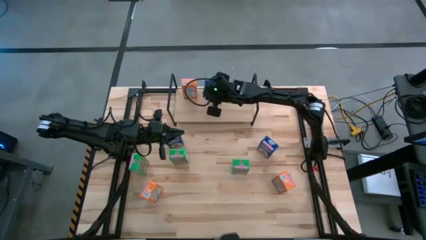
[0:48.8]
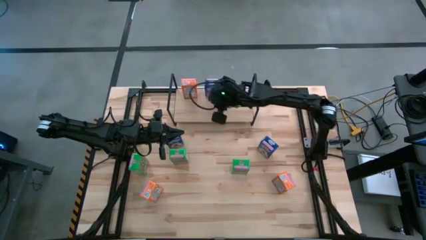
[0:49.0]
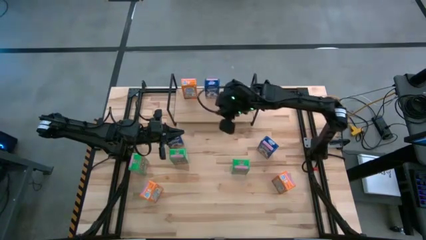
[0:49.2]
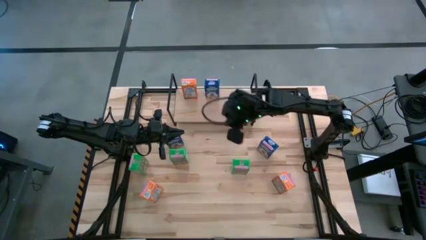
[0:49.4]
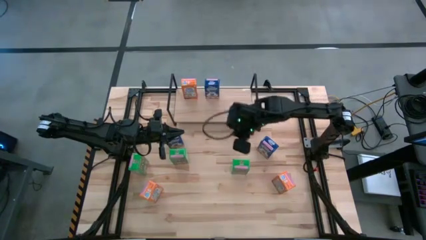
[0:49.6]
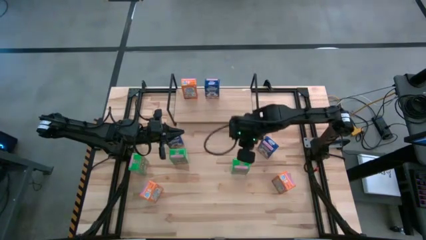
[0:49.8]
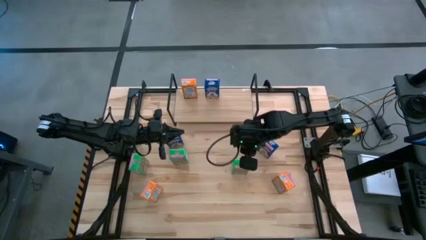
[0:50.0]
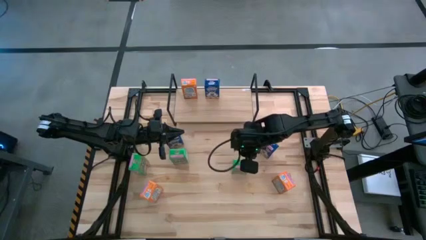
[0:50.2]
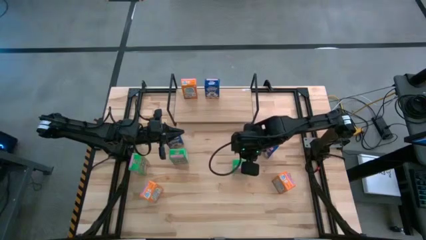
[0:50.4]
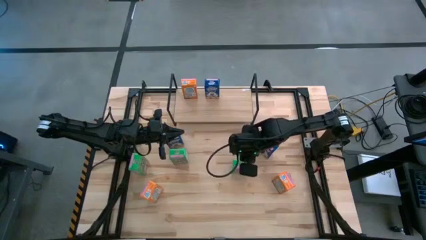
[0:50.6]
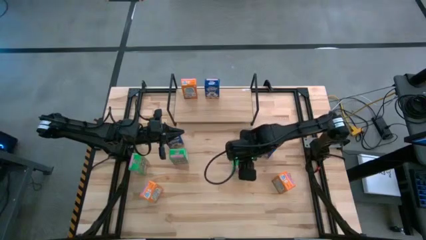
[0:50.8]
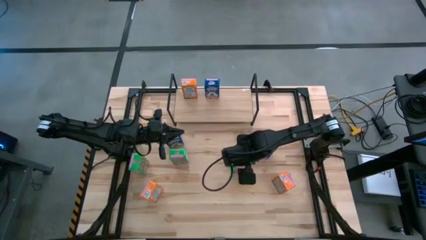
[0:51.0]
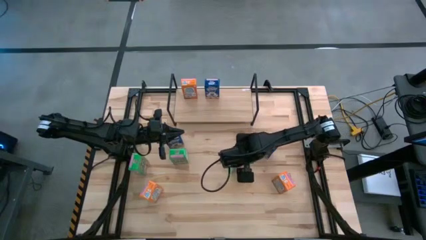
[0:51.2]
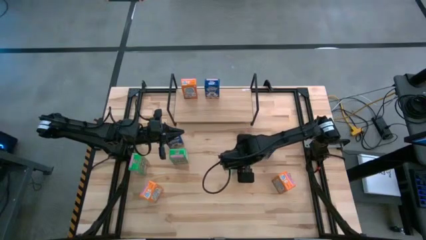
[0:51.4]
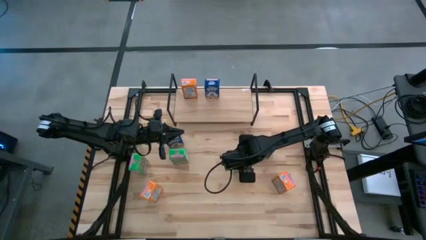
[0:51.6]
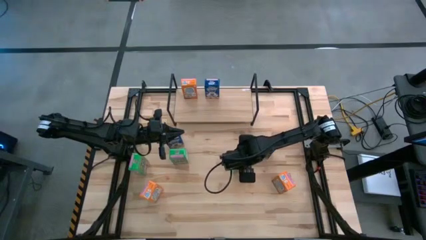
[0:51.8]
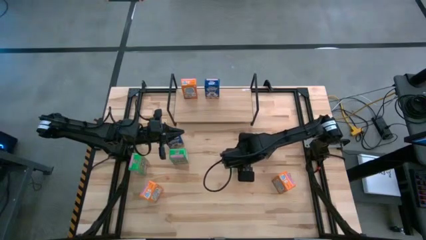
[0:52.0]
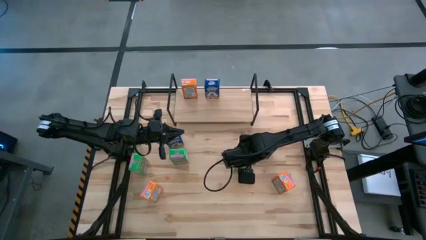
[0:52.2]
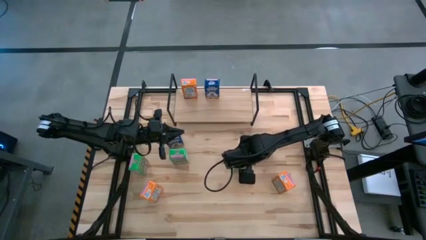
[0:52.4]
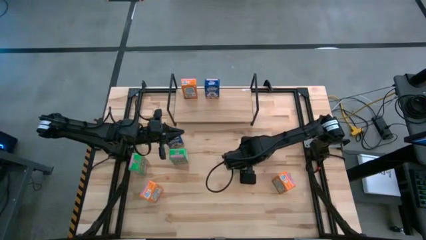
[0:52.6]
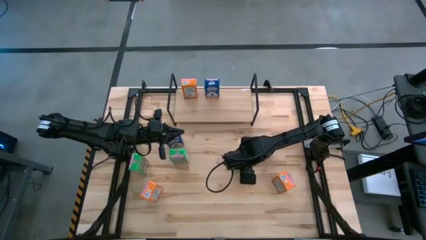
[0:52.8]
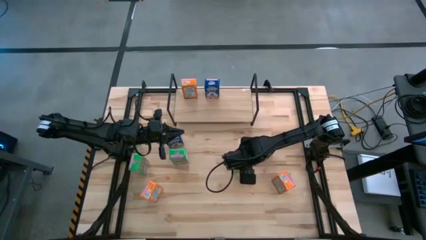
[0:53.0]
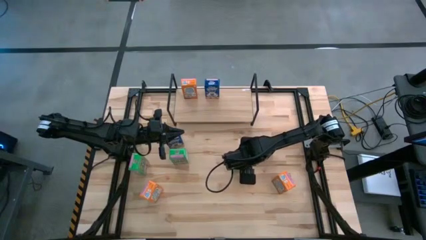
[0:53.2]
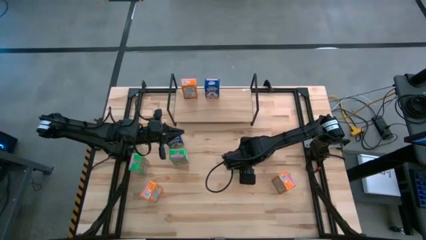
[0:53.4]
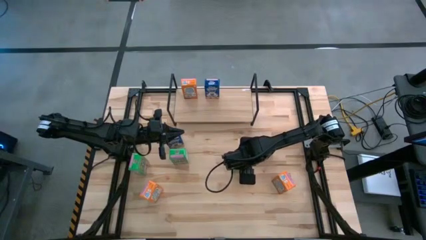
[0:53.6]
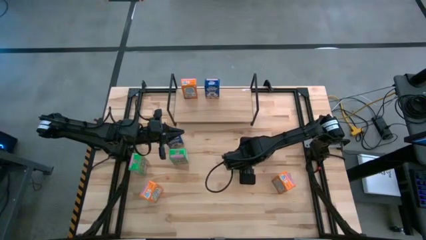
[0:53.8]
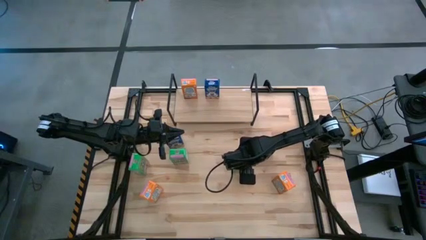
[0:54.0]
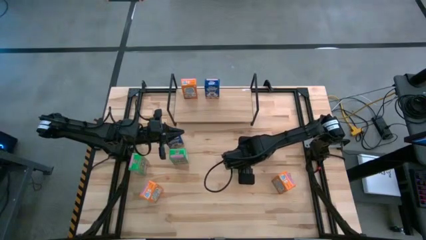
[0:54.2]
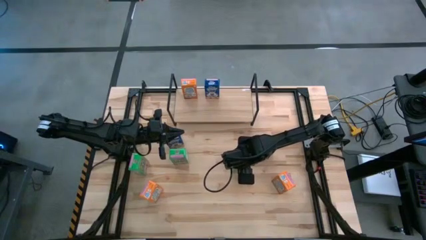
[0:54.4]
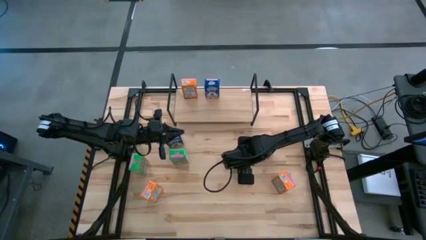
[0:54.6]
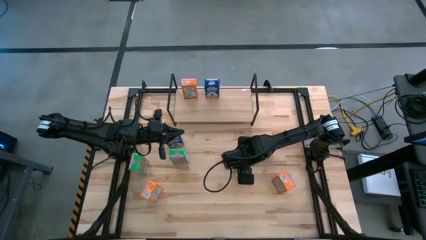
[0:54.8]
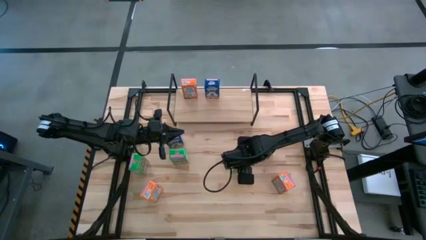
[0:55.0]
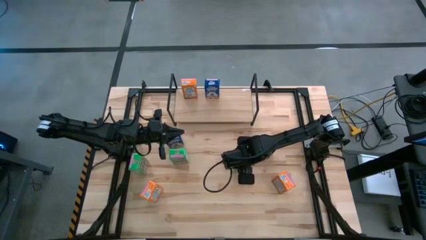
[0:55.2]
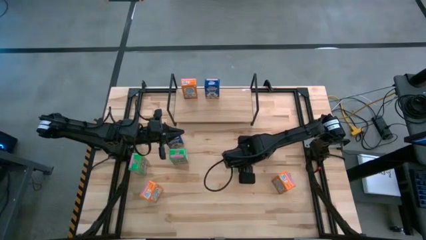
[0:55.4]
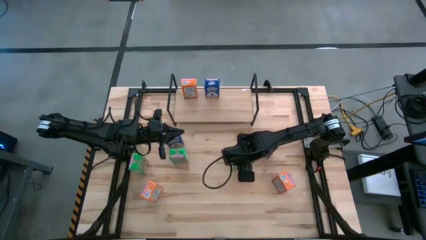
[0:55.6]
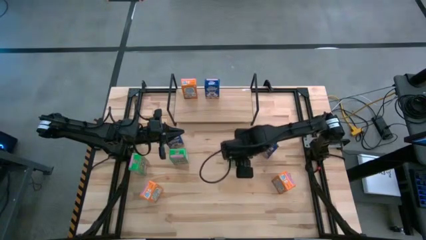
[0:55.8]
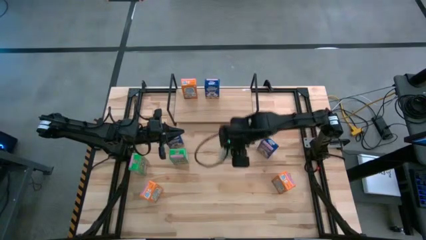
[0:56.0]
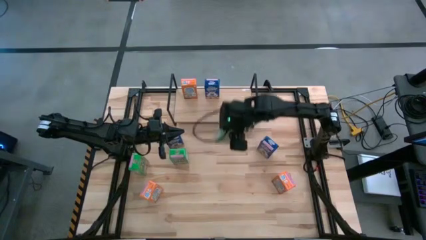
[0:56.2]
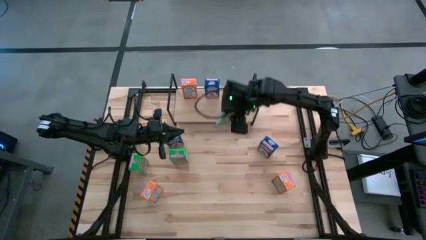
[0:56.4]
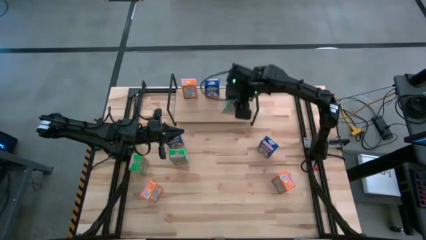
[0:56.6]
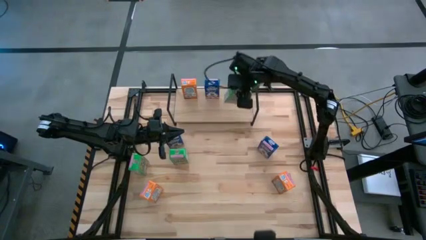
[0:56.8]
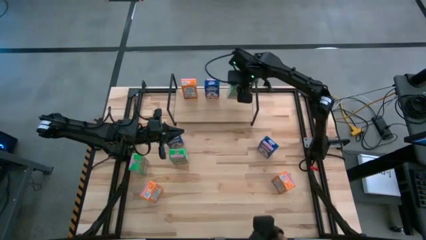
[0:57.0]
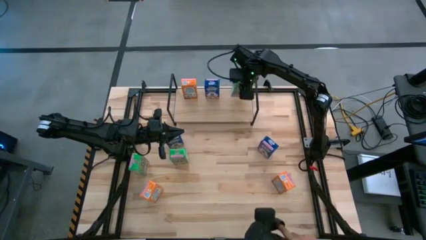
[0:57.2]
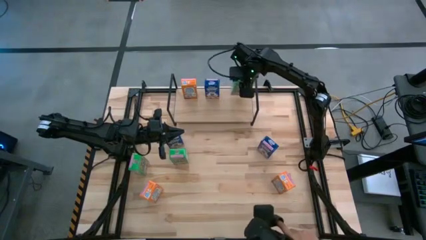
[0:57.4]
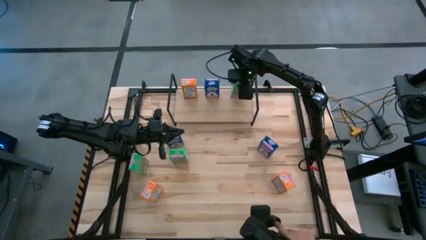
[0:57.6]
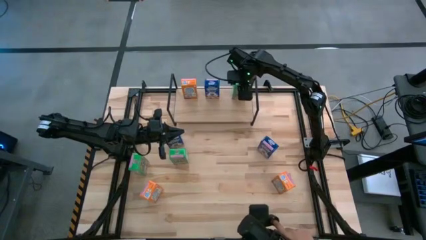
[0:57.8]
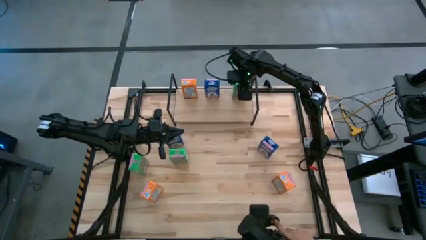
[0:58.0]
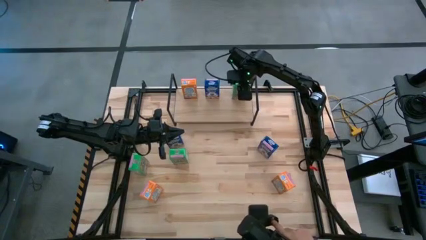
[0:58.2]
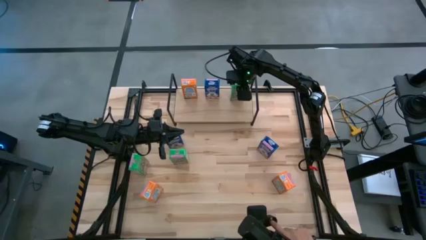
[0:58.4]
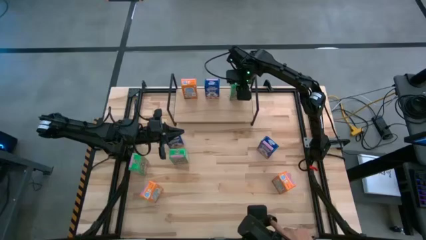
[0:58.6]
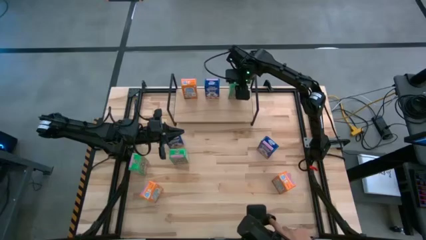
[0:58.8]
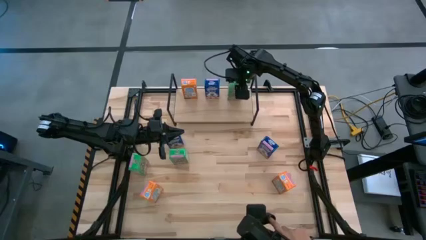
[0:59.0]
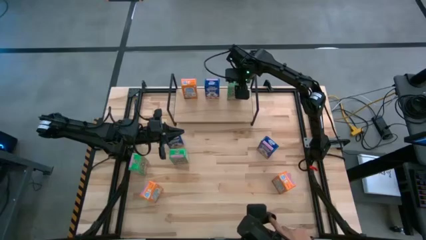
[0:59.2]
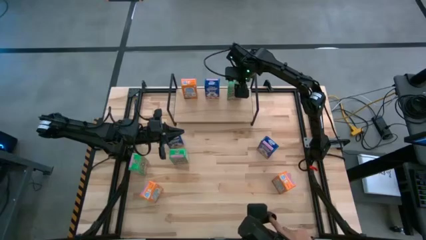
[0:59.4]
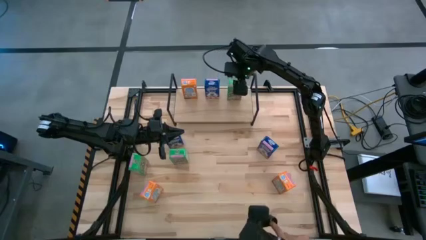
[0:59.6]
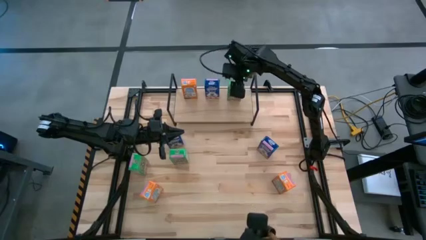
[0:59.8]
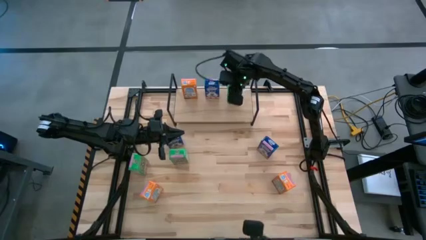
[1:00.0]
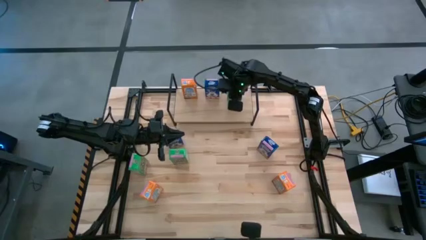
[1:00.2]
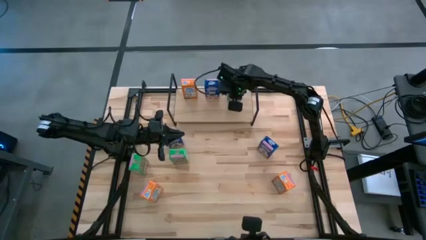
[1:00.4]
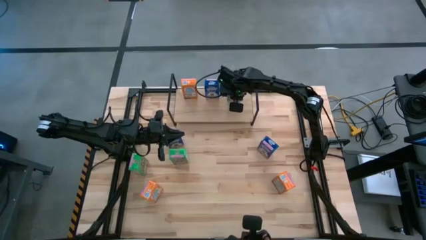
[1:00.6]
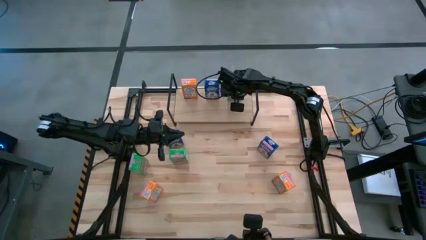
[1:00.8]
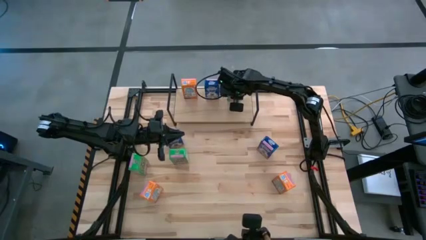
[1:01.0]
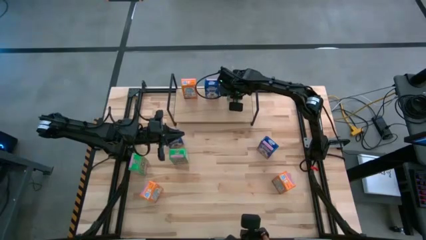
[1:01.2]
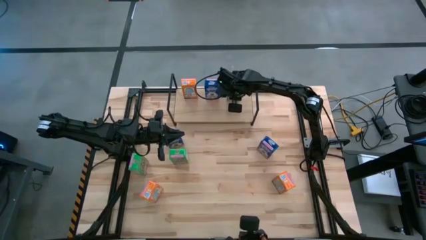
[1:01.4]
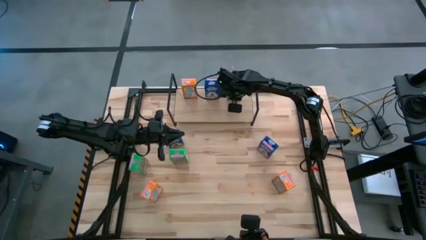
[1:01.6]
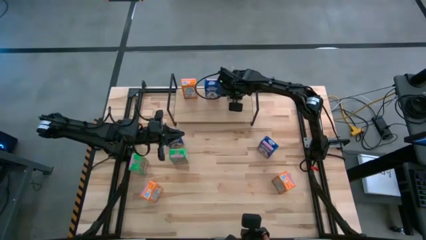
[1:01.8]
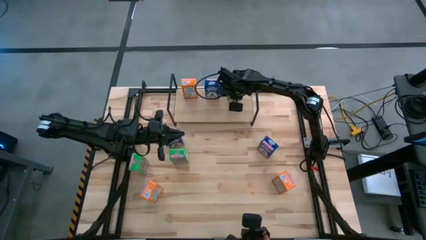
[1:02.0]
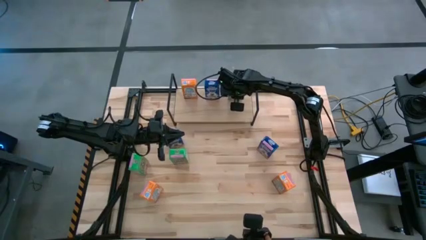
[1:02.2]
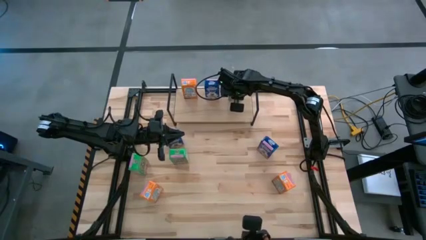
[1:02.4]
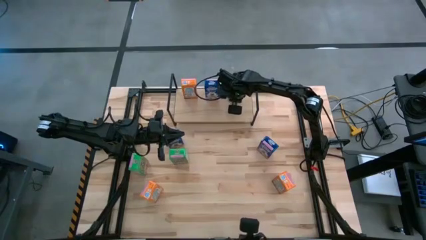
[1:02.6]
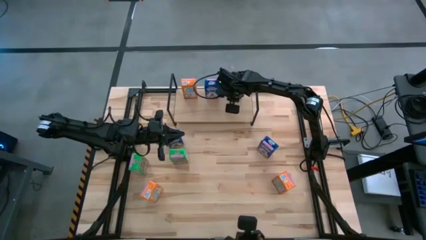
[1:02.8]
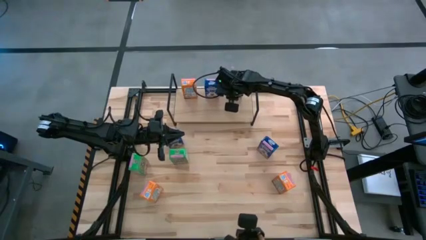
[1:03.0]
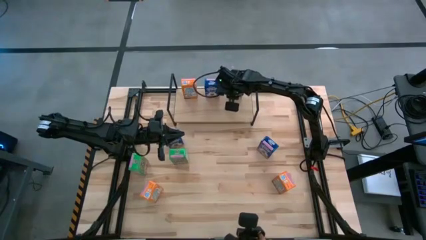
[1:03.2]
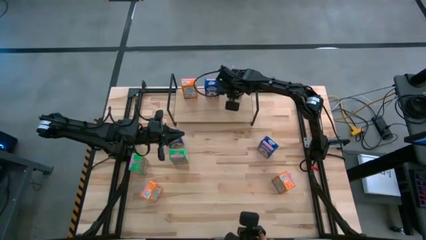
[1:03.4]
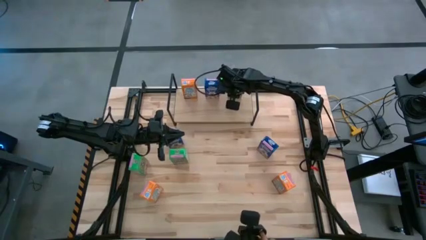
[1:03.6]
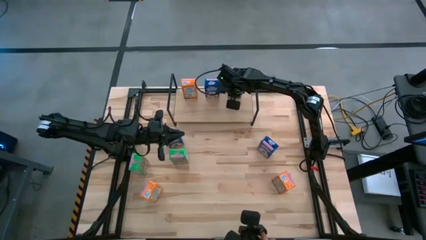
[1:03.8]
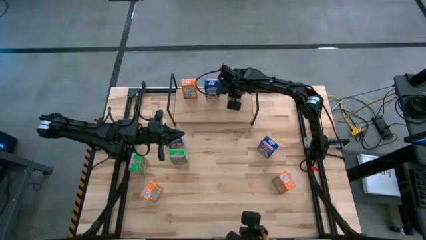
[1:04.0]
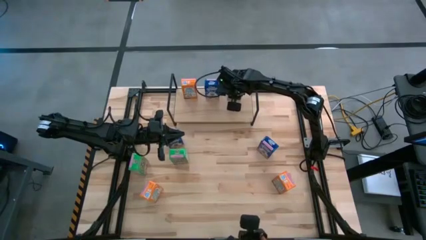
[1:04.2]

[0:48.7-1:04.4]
Task: Stack cereal on shelf
Put the right green cereal box on the shelf

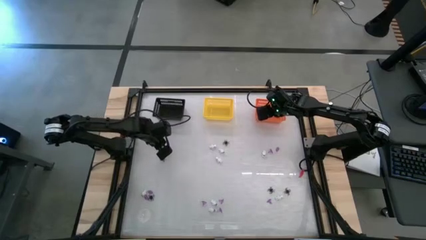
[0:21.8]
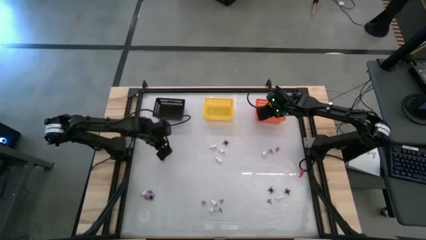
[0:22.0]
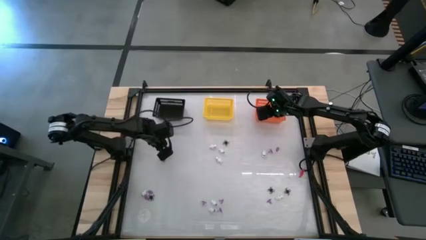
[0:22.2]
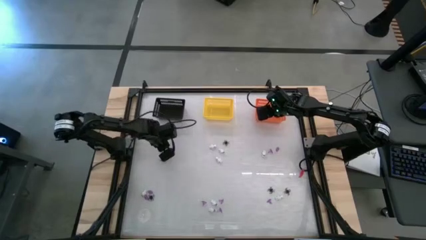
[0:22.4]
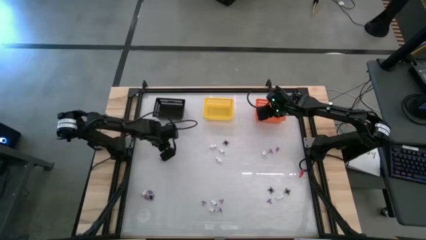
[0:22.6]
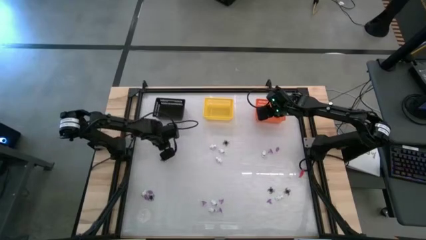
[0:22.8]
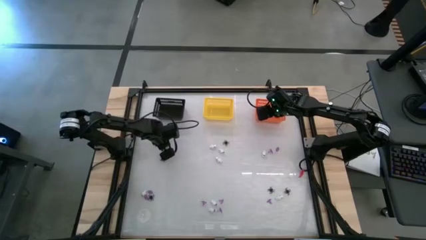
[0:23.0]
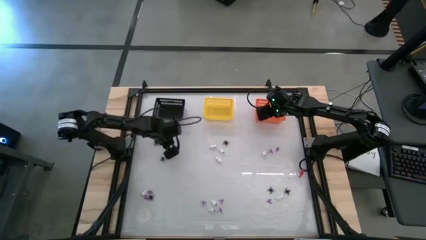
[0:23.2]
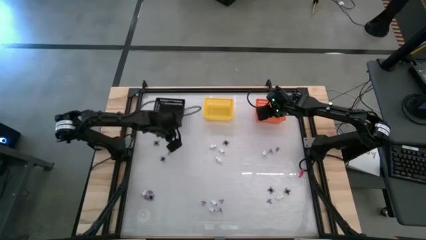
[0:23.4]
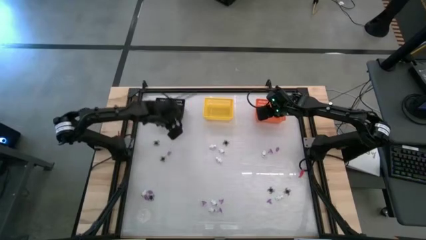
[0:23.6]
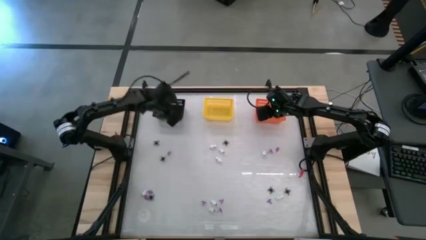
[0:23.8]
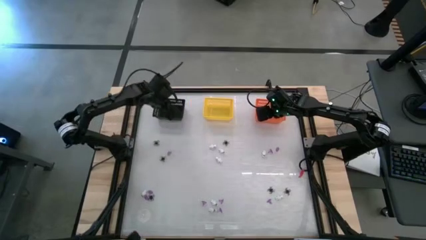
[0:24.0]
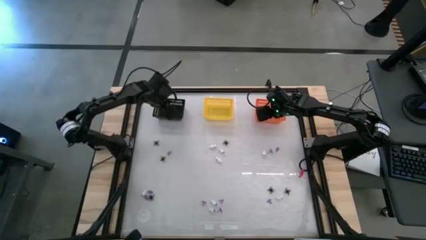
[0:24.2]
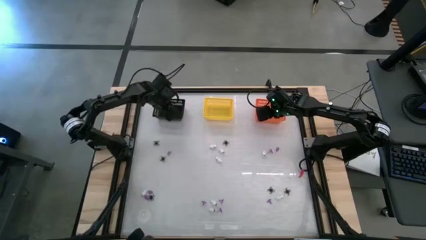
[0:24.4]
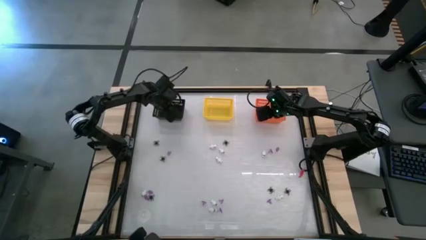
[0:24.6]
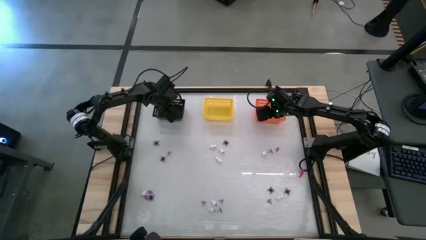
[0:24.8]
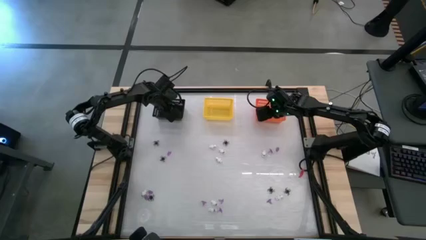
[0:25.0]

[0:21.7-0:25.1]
Task: Sort Halloween decoration
Put the white skeleton toy into the black basket
